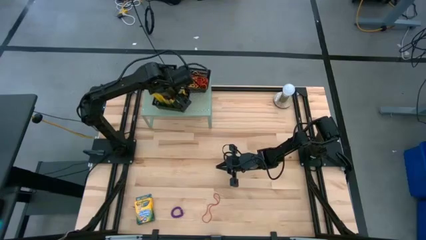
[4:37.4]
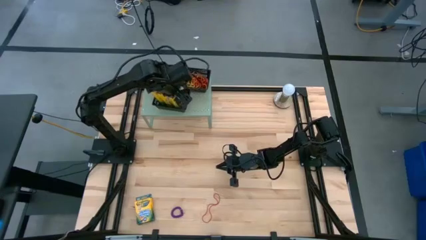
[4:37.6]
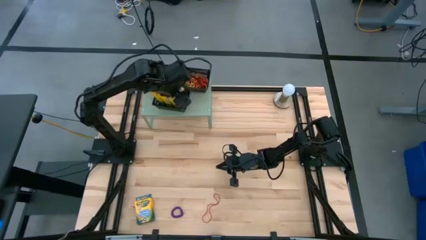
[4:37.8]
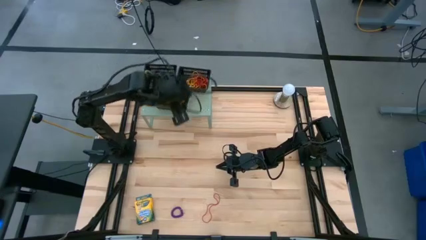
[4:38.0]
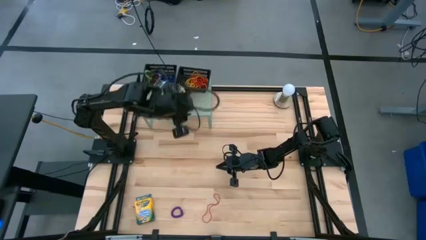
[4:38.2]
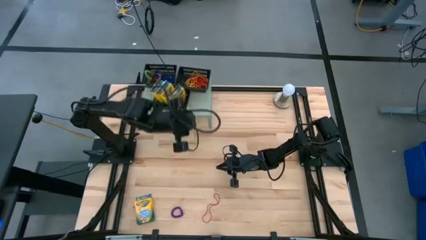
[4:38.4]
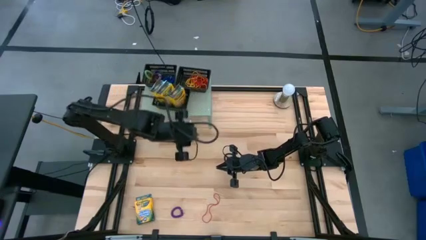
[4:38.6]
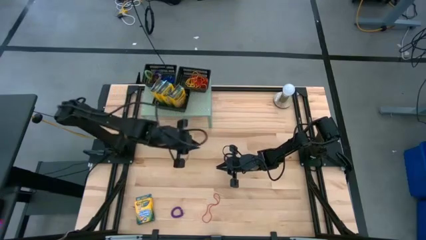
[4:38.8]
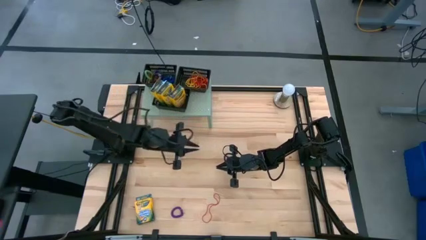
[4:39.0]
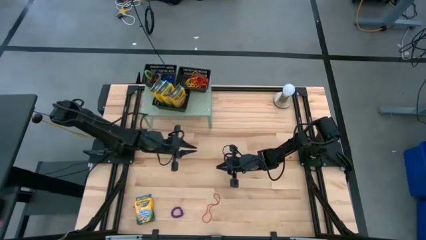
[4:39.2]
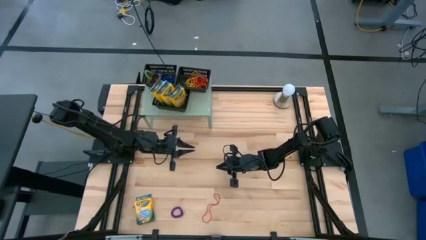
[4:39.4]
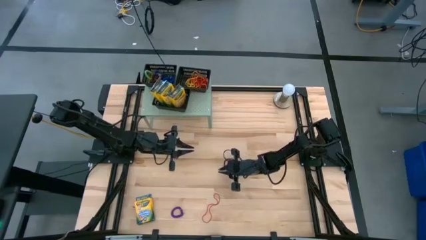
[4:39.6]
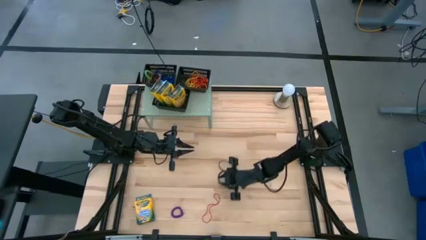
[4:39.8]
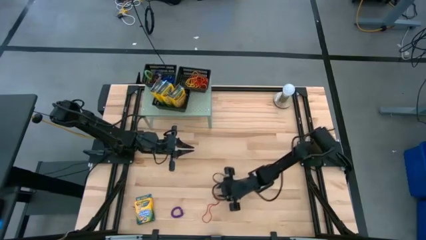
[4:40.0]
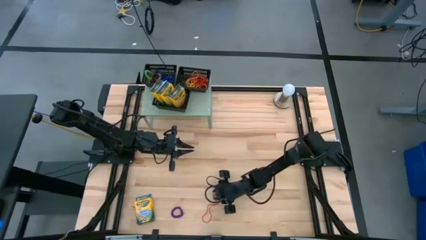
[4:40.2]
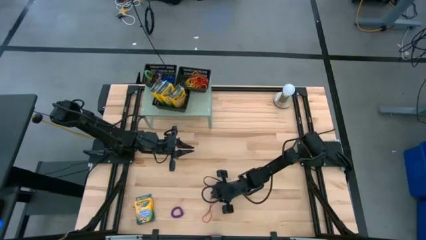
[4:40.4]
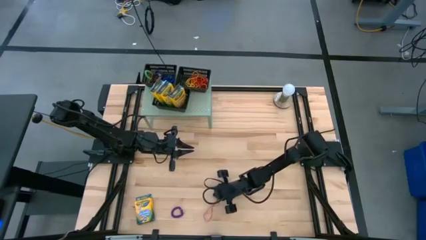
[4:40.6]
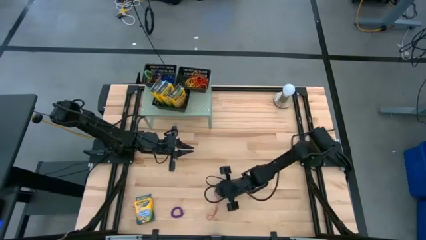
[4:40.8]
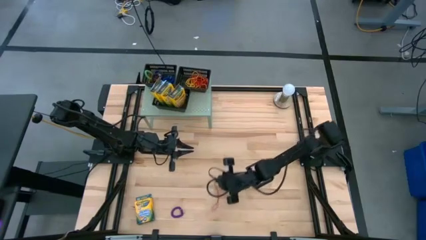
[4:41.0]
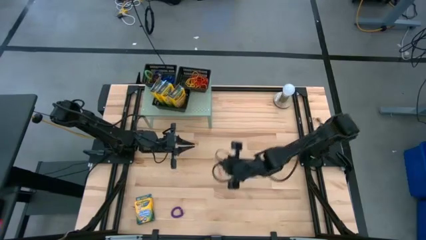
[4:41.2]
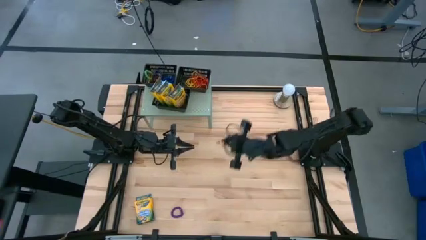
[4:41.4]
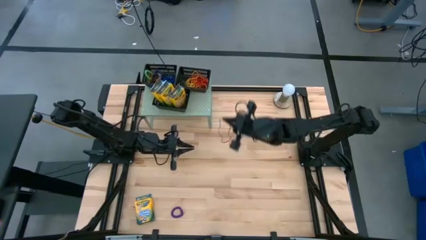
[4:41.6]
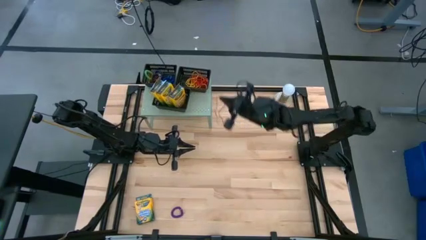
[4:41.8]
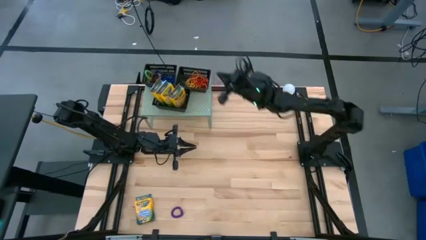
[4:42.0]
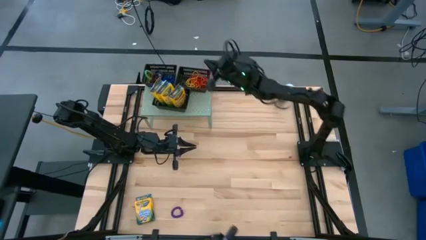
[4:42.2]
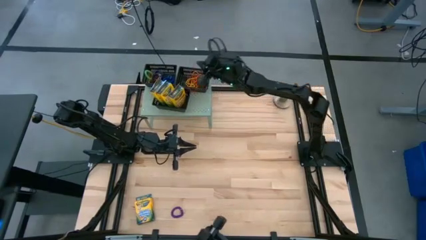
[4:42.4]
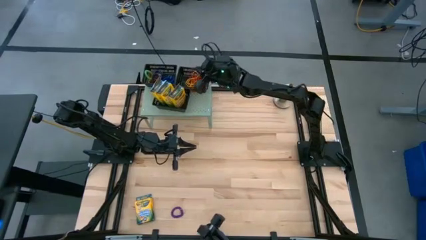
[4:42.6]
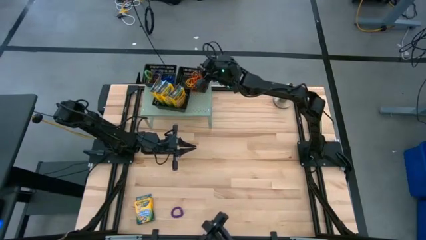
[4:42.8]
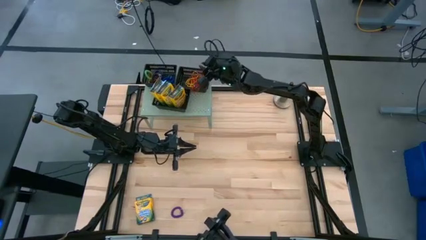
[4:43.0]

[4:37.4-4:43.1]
Task: Pick & Place Office Desk Supplies
Put the red rubber band into the top right black bin

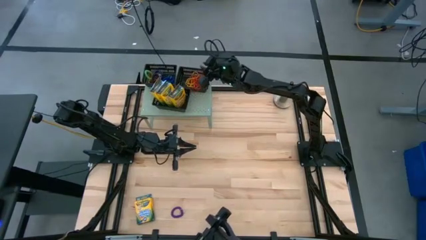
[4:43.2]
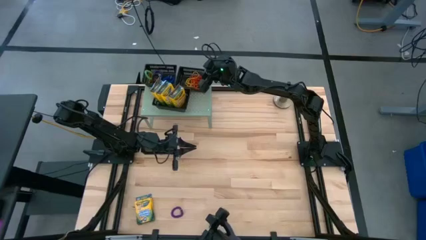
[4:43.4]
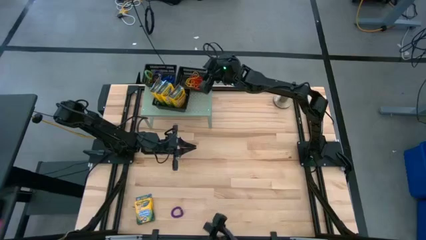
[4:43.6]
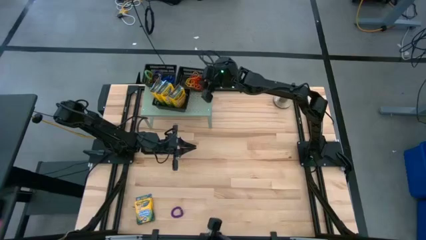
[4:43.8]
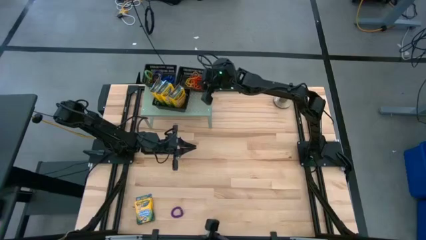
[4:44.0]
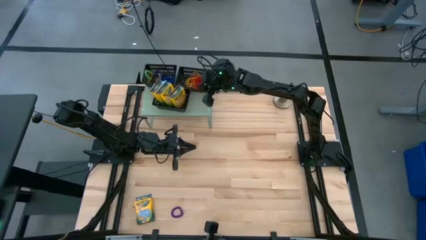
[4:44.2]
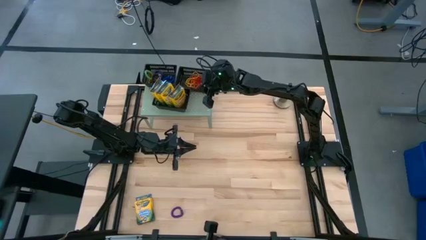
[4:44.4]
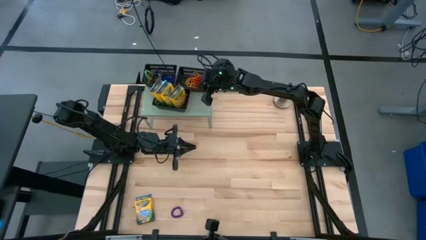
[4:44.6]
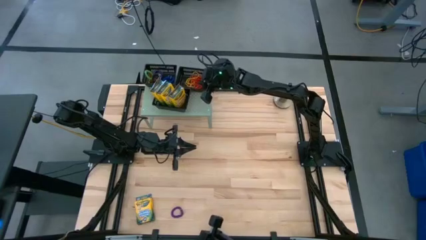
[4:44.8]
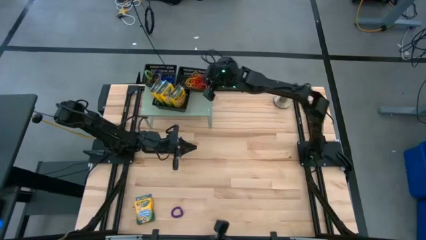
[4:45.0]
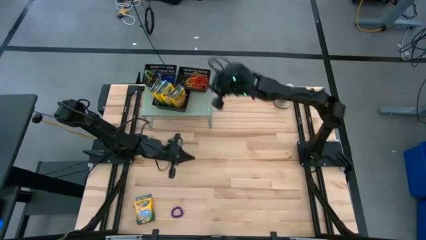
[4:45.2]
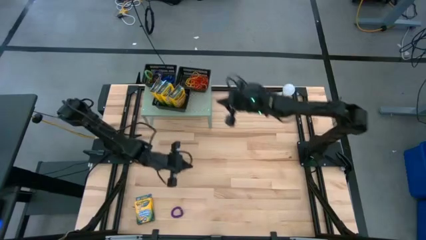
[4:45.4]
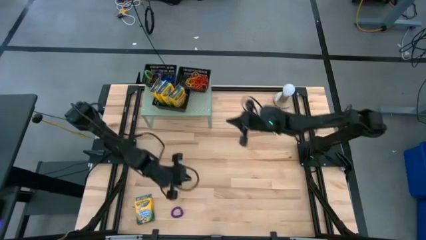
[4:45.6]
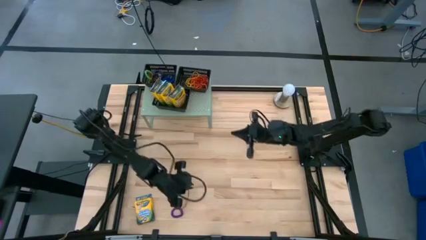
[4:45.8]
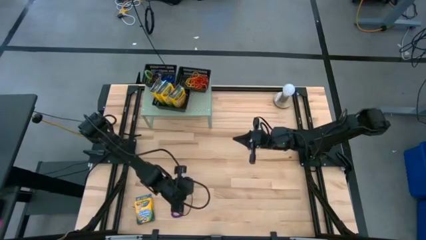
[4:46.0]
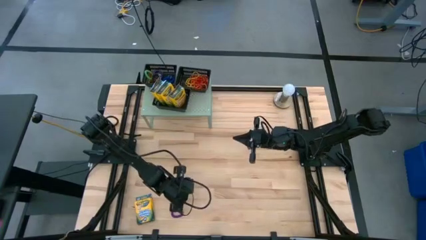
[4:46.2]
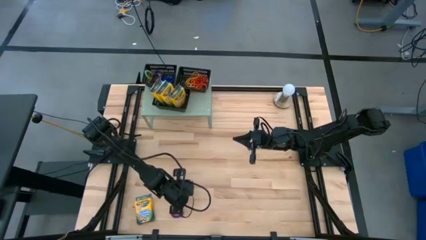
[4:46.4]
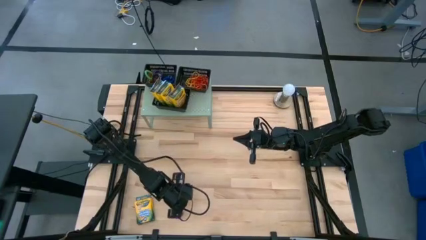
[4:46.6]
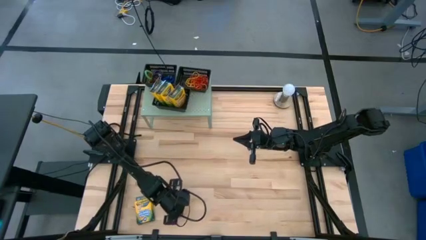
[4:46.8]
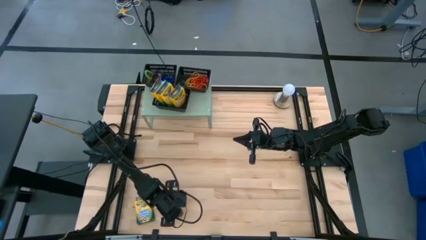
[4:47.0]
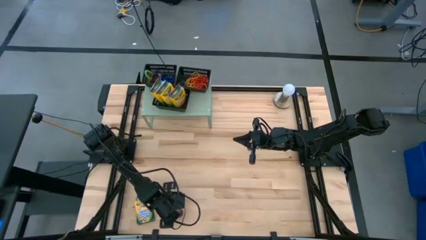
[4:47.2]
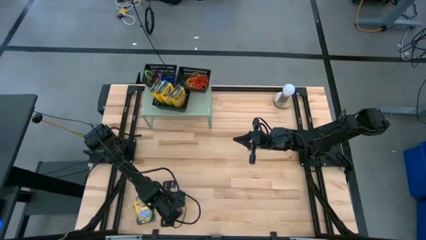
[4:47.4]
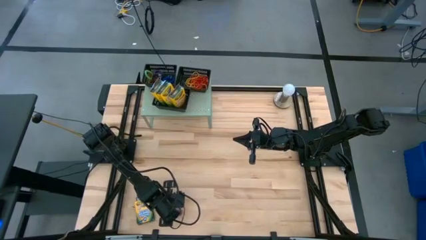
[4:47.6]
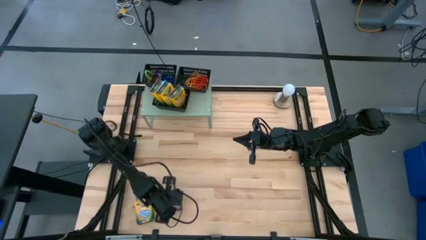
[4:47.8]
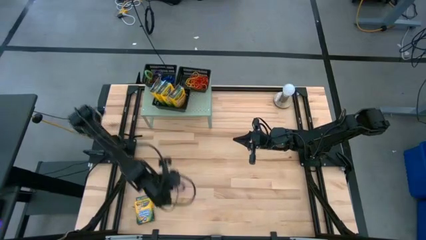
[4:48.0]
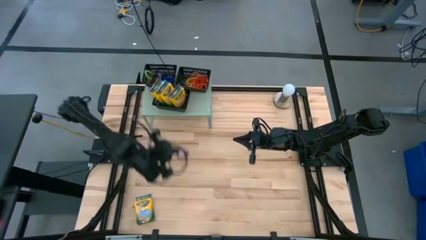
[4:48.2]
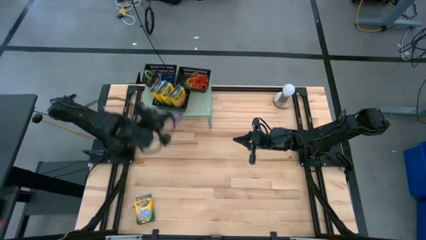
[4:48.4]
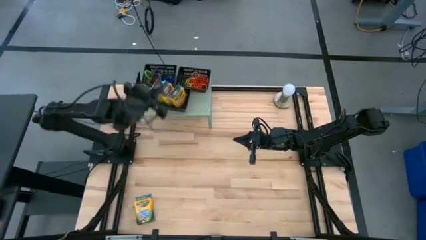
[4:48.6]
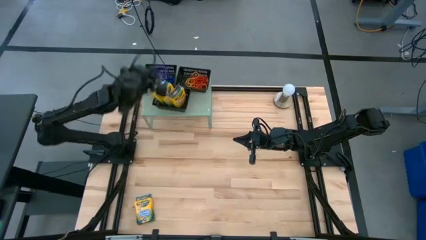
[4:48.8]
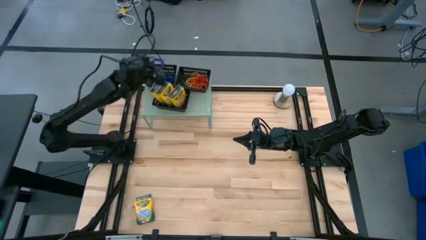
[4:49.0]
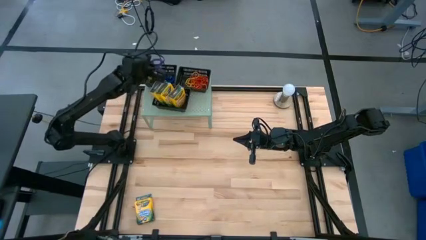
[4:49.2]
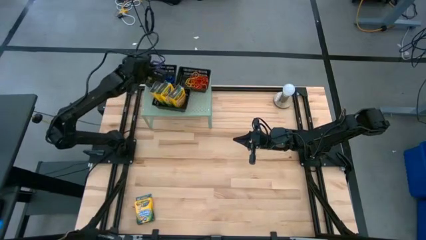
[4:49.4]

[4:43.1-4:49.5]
Put the violet spring rubberband into the top left black bin

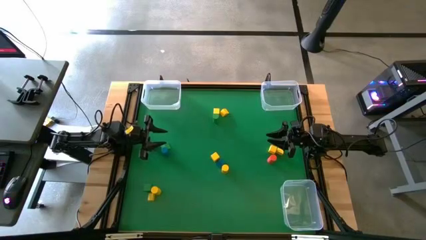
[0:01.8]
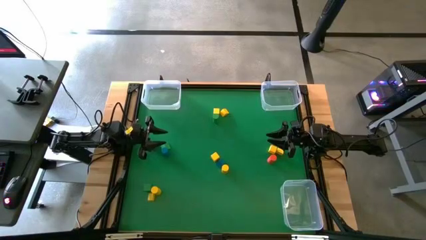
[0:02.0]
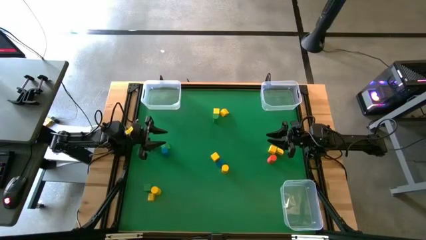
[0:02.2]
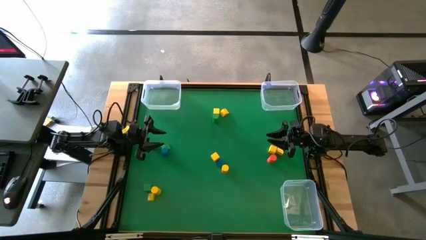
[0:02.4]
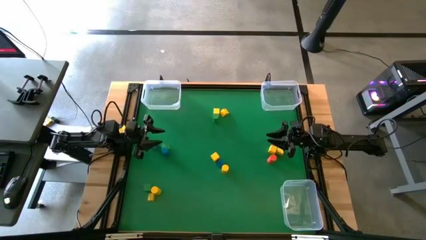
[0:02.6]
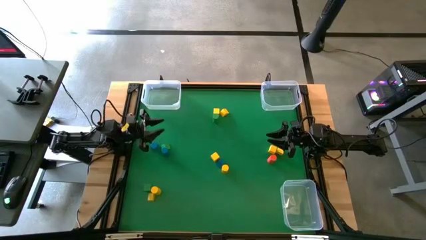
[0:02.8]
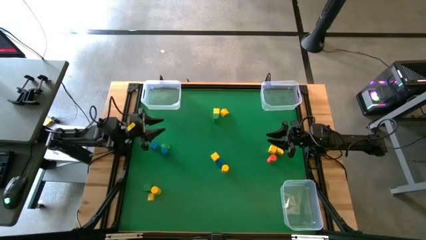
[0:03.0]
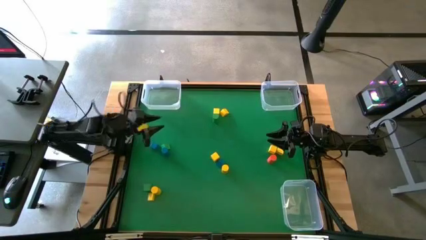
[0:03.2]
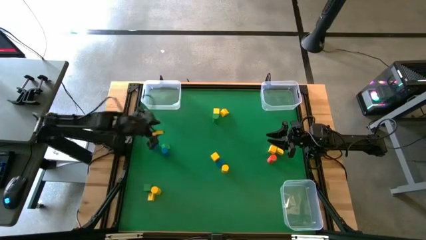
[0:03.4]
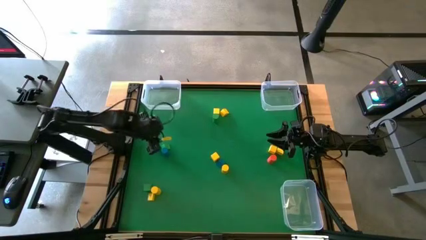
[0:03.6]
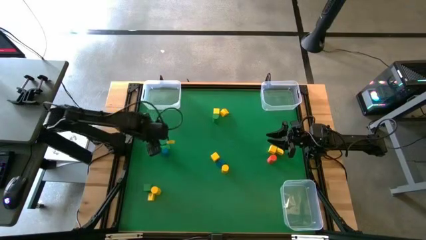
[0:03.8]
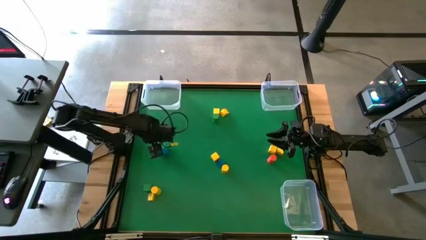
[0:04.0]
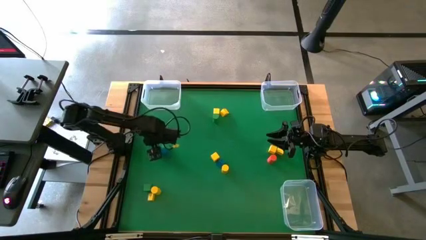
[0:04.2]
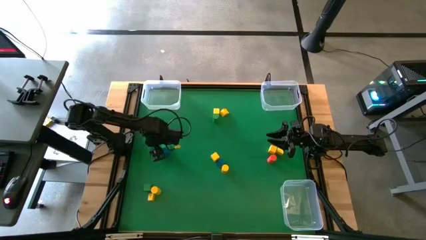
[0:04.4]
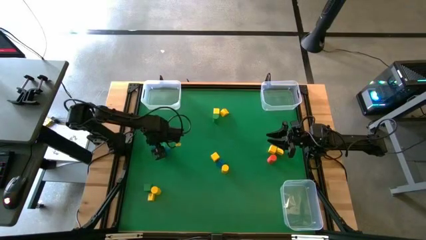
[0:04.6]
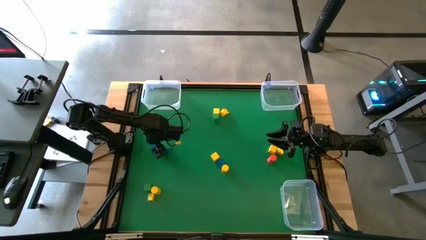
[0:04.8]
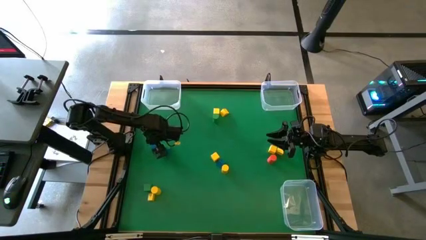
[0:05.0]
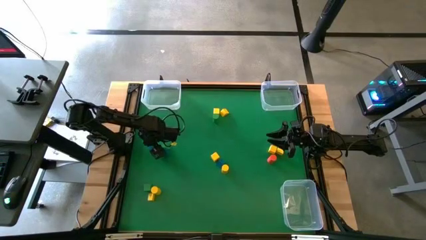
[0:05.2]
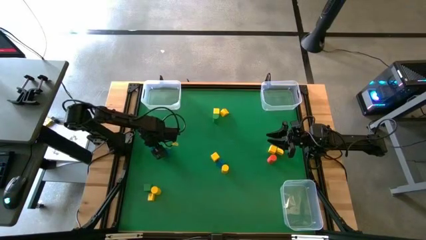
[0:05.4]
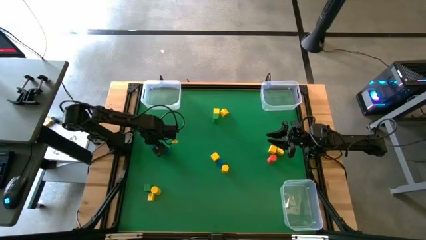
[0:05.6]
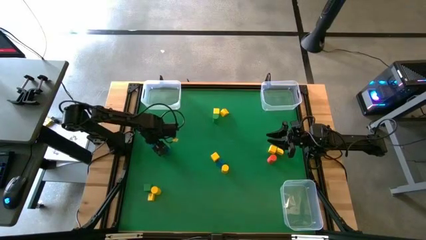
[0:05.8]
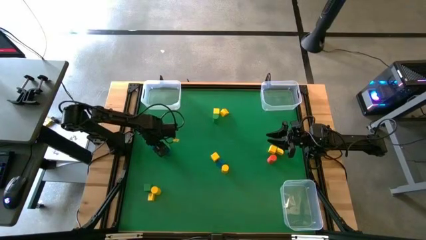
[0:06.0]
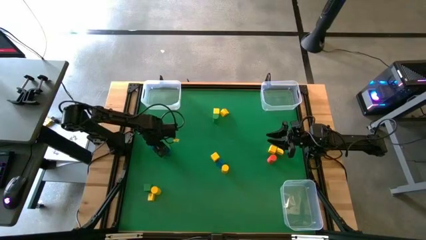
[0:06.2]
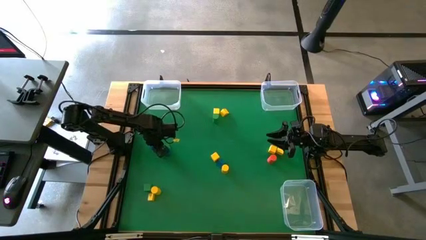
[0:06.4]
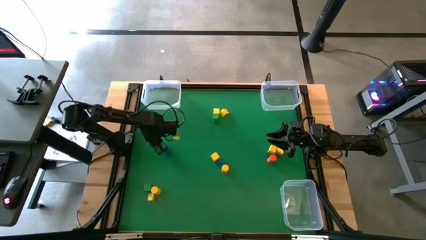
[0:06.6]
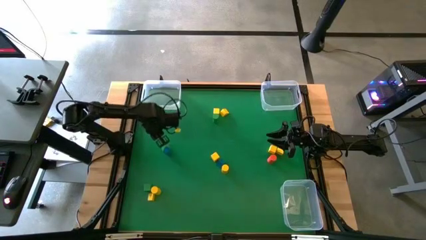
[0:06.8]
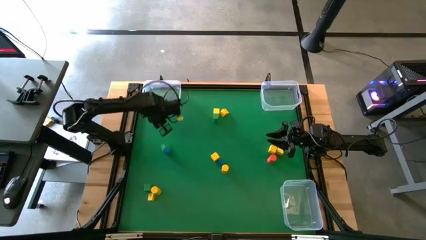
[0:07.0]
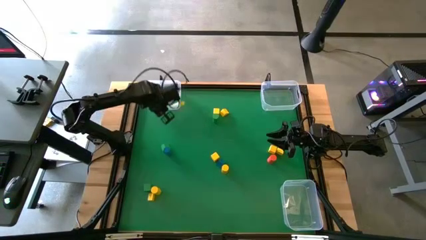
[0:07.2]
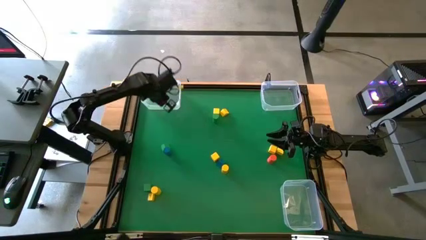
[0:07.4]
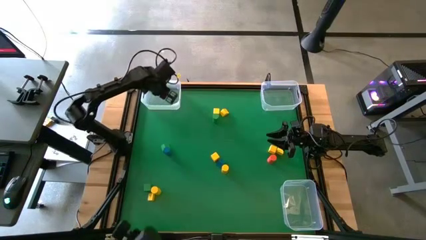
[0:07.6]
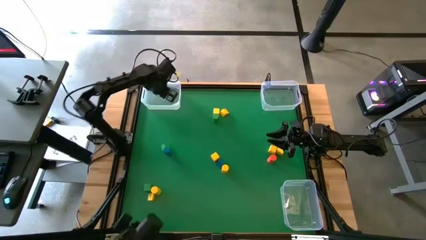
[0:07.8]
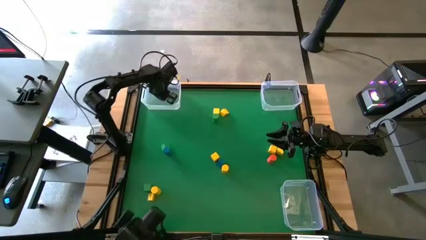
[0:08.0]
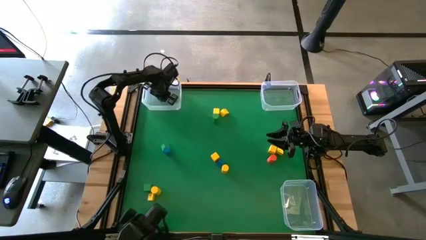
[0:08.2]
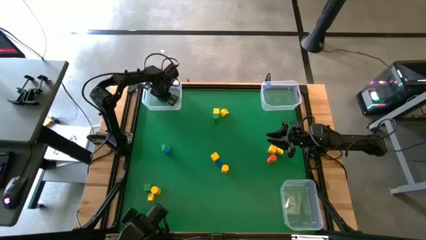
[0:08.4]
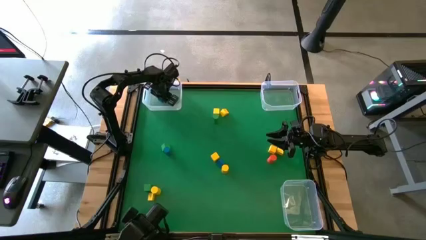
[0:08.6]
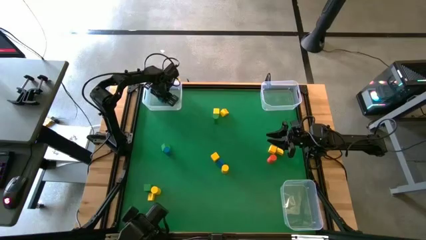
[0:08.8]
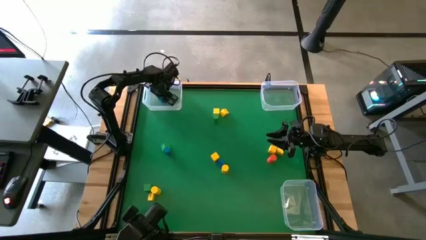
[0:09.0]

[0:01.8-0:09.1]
Task: Sort blocks by size
Put the blue cube block into the top left transparent bin
